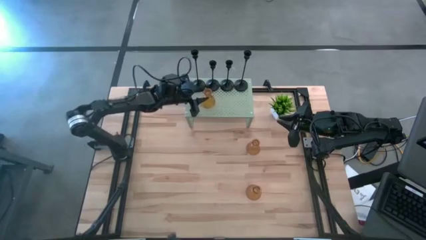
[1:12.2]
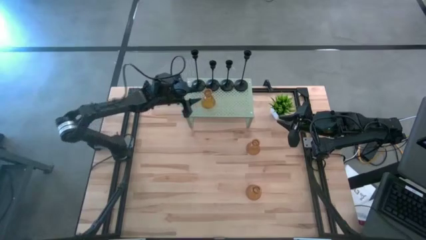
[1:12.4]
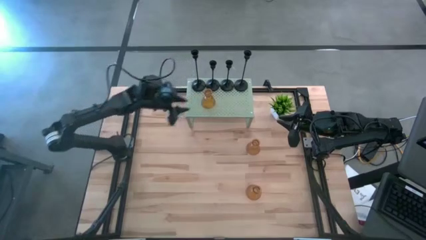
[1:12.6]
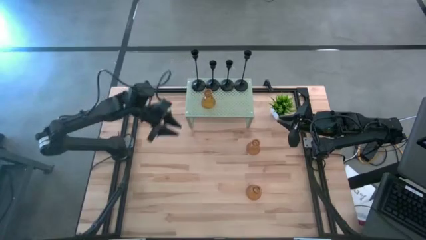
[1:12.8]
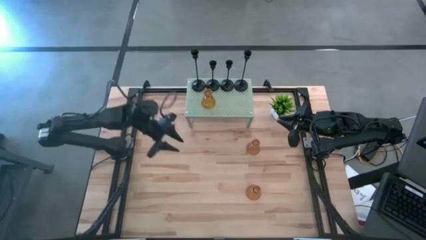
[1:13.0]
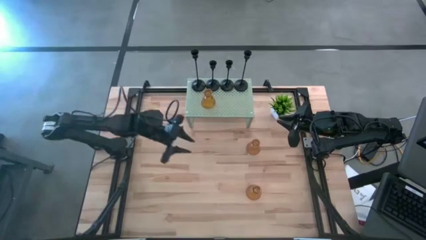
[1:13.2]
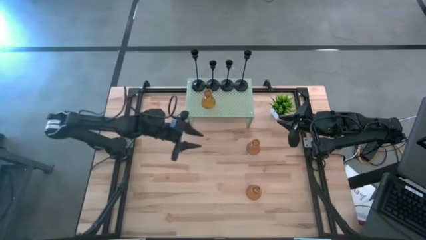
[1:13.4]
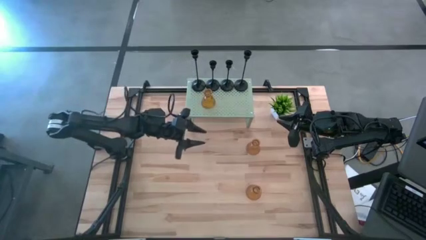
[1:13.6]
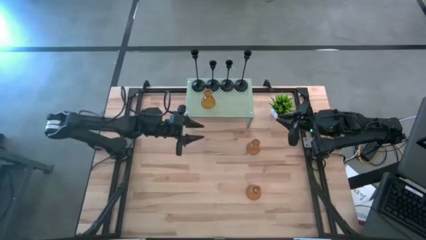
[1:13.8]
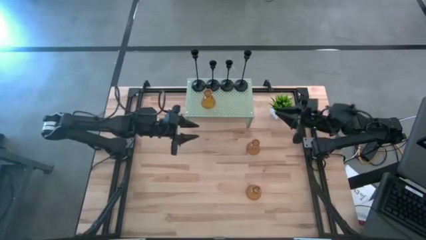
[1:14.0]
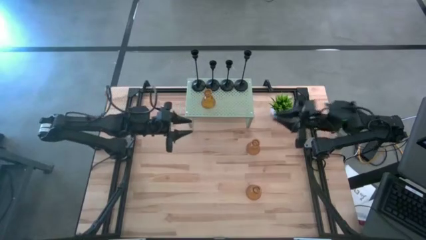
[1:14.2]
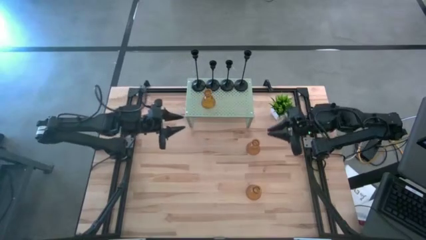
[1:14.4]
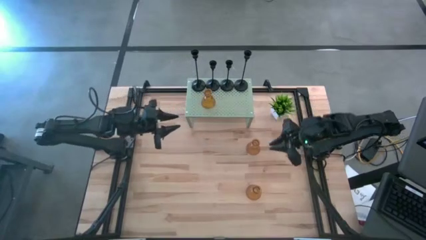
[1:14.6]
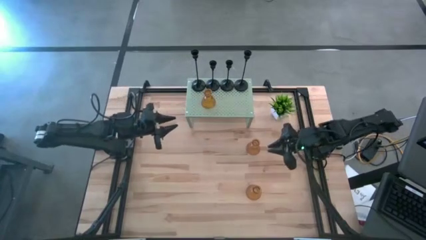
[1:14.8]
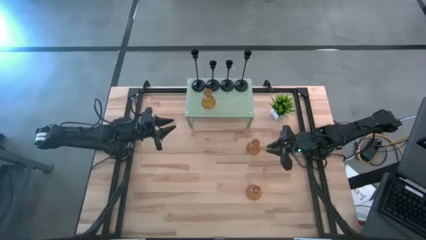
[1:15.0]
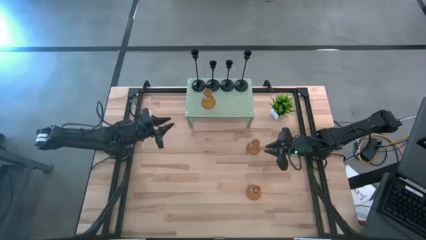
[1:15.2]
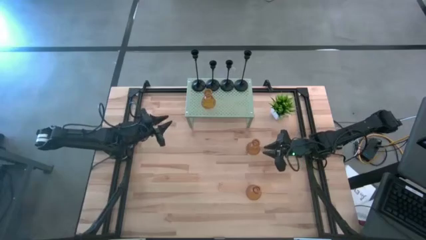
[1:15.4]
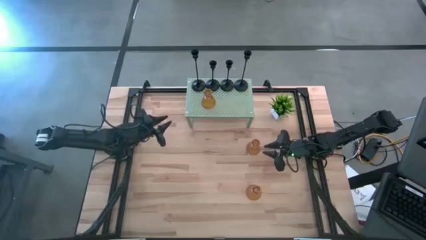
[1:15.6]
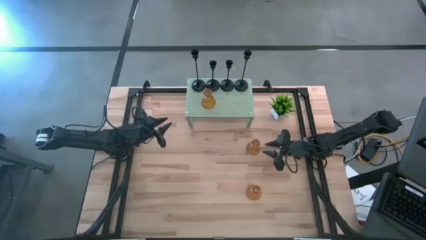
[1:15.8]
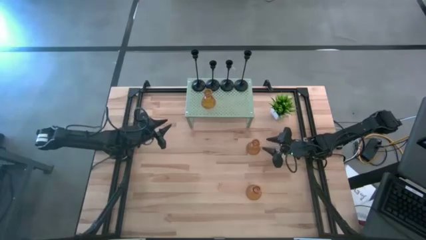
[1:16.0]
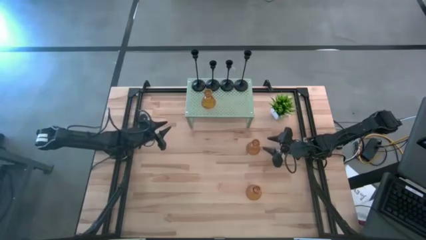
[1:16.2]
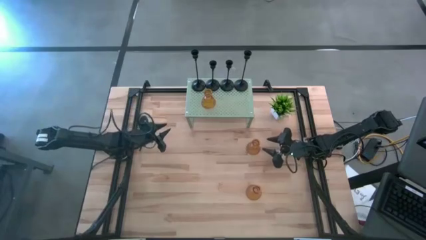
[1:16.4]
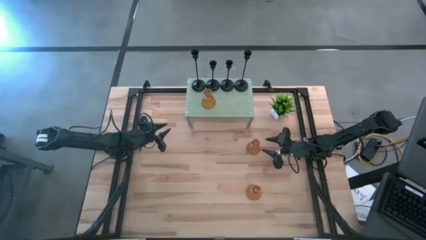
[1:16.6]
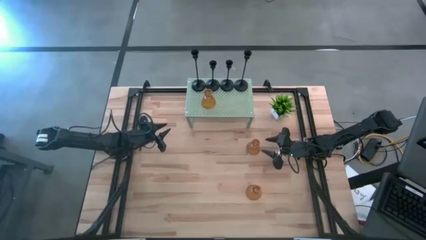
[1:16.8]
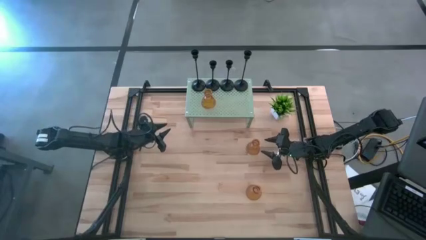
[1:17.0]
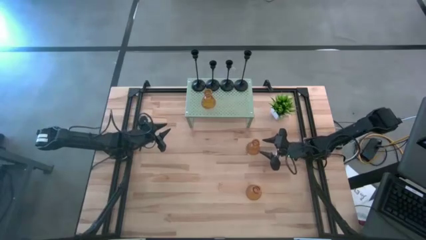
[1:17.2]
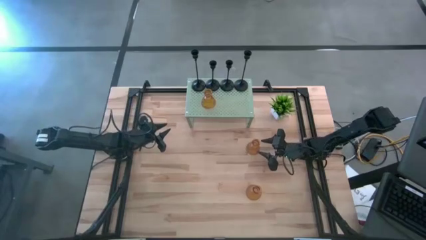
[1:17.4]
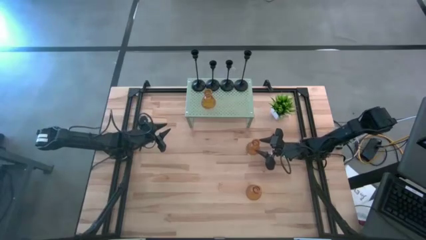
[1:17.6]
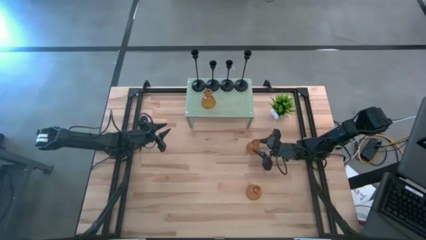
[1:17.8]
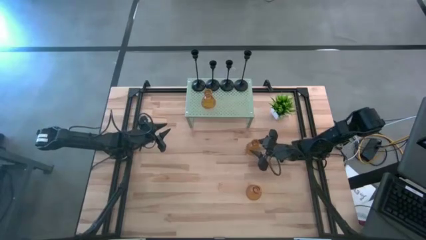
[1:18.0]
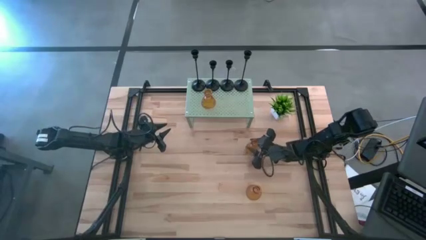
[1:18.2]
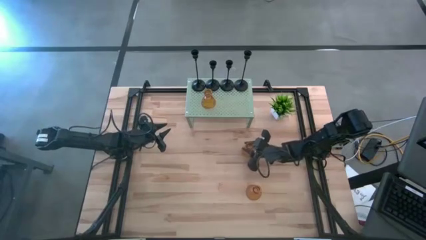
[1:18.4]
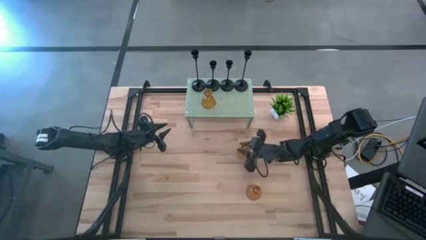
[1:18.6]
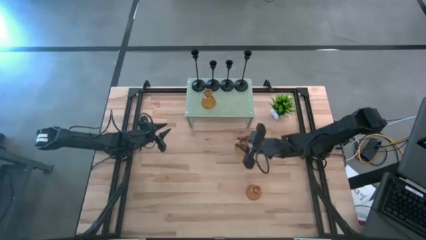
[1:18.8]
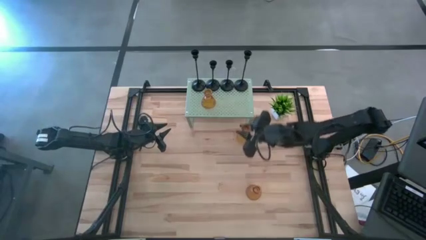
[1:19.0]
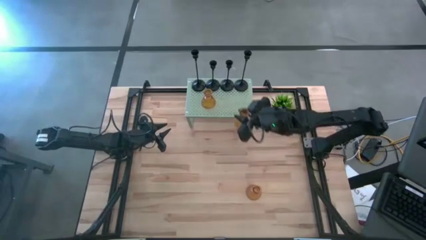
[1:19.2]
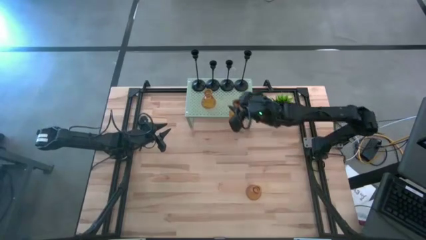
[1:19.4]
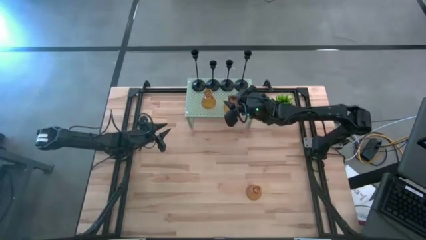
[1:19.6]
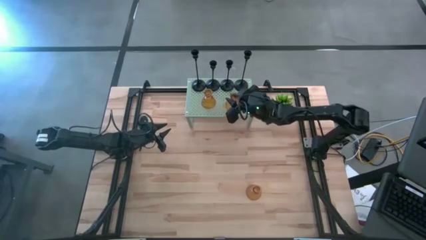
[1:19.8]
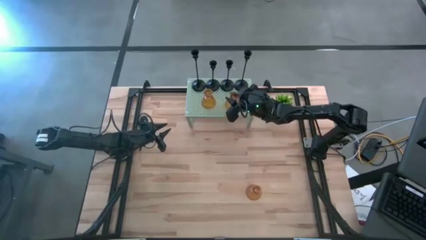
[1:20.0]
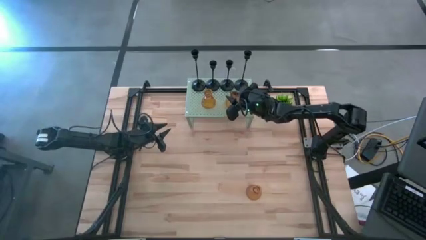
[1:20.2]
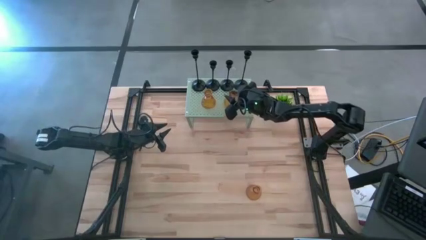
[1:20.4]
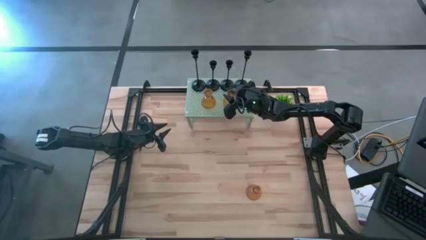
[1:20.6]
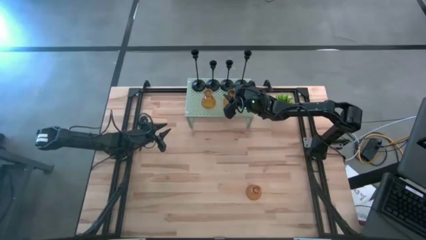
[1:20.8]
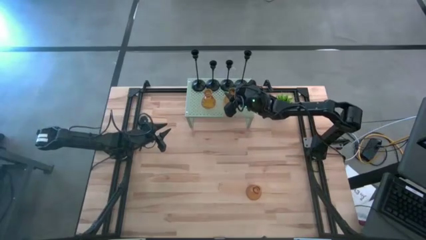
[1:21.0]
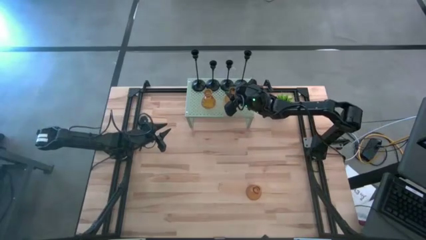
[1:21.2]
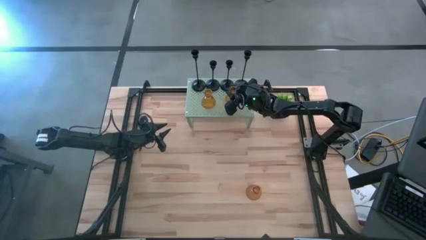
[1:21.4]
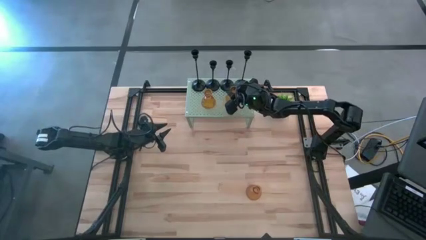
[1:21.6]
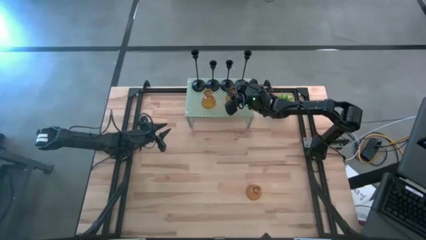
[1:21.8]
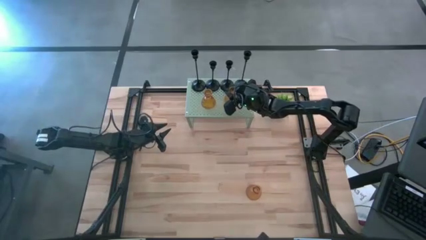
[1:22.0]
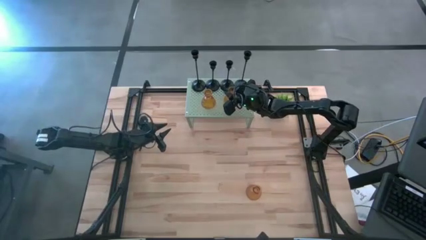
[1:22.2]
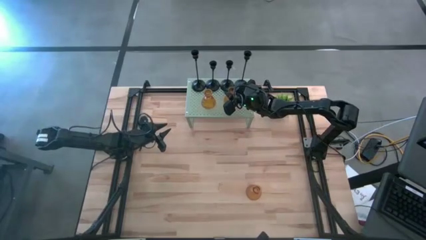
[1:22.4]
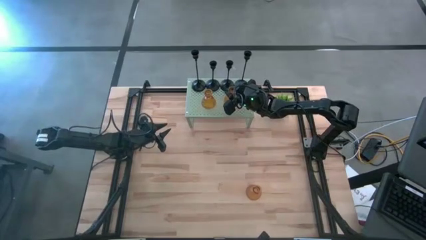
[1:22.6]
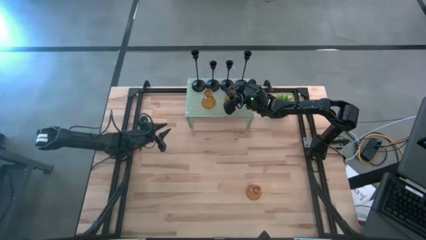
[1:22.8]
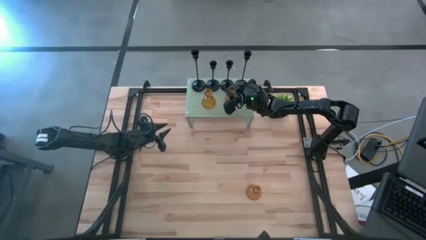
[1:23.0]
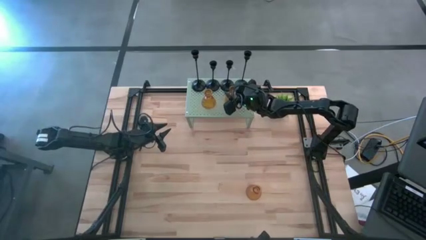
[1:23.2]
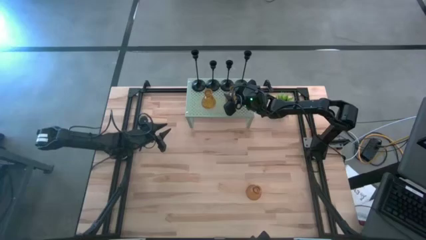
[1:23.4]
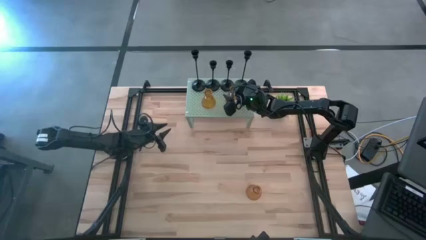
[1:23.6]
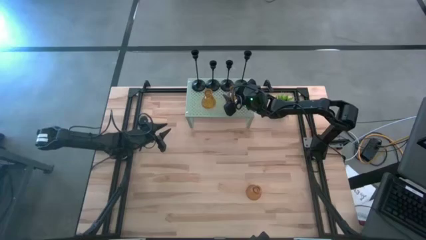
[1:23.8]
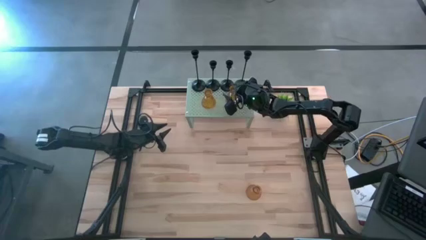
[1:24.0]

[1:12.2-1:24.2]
Task: Pick & Place candle stick holders
Put the top orange candle holder on the shelf aligned with the other orange candle holder

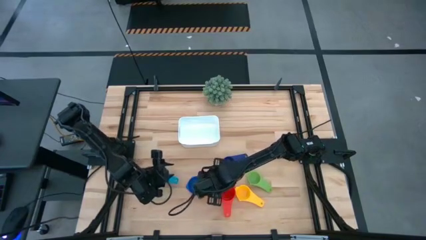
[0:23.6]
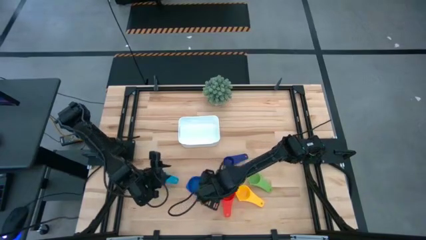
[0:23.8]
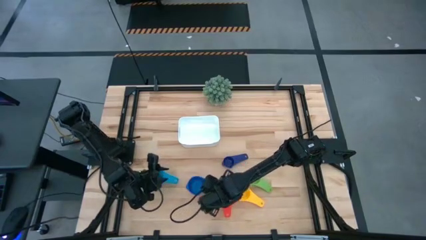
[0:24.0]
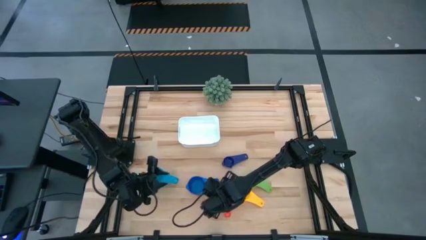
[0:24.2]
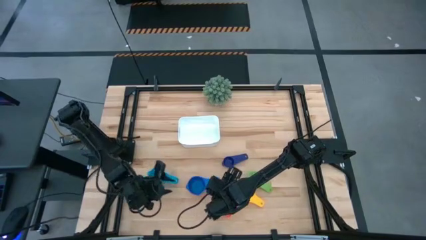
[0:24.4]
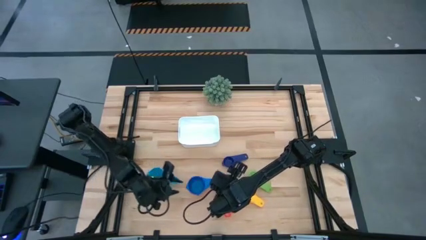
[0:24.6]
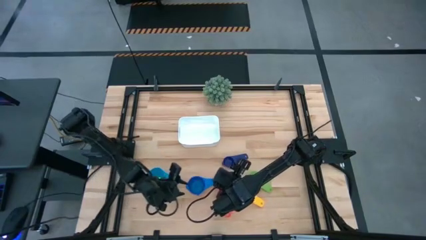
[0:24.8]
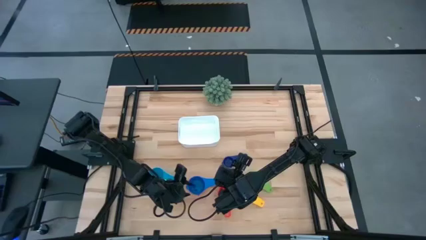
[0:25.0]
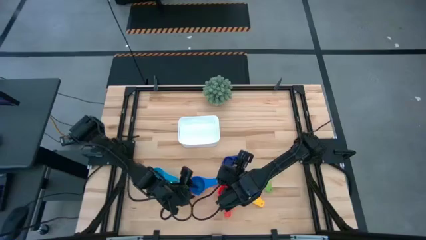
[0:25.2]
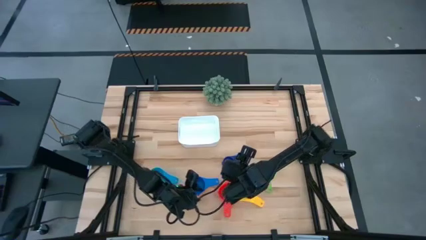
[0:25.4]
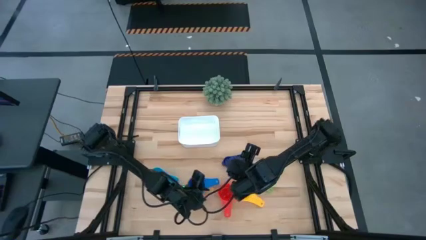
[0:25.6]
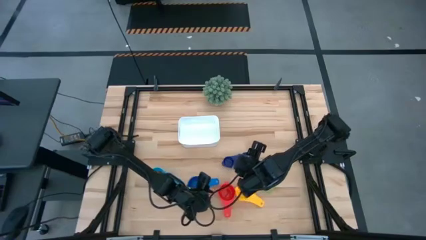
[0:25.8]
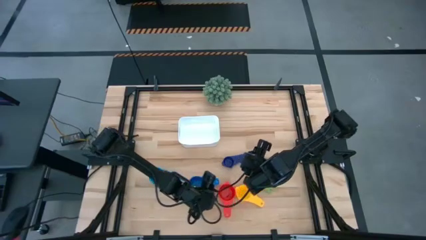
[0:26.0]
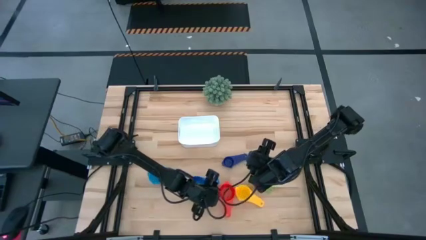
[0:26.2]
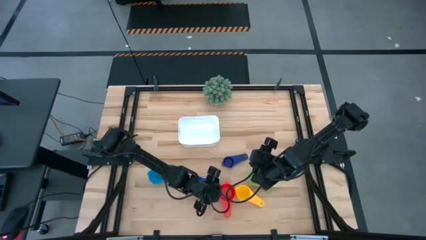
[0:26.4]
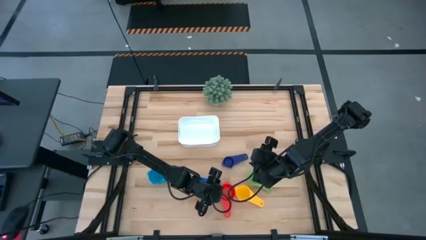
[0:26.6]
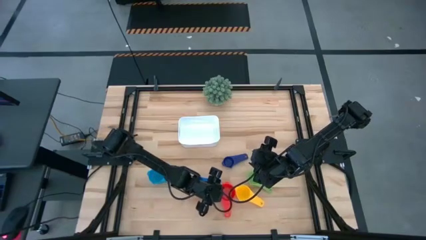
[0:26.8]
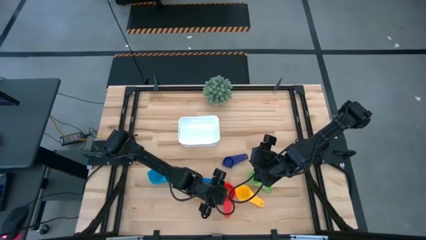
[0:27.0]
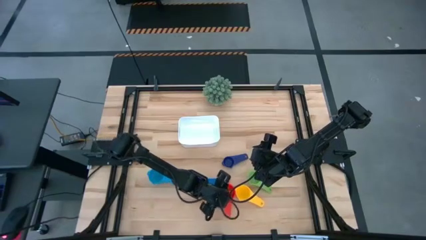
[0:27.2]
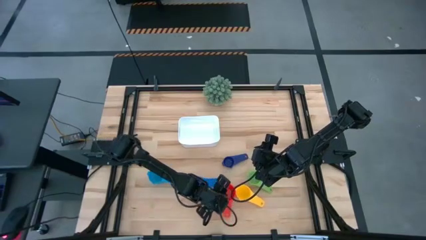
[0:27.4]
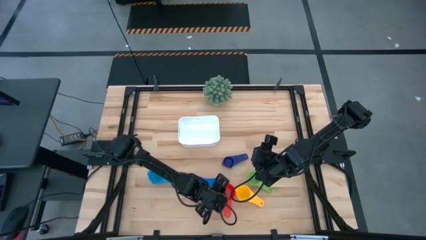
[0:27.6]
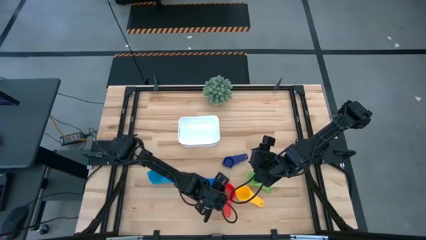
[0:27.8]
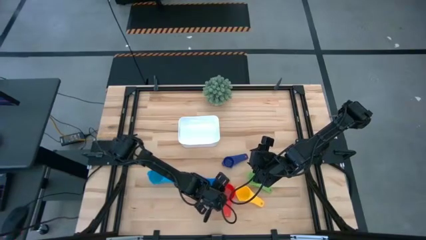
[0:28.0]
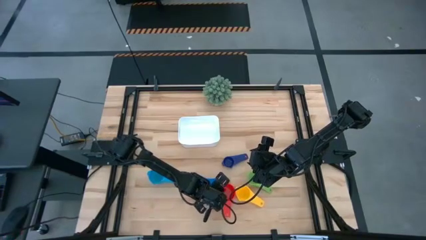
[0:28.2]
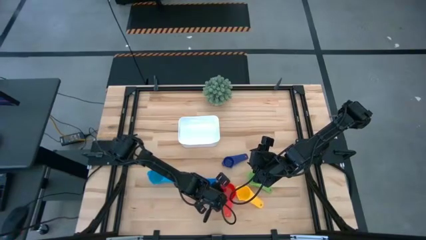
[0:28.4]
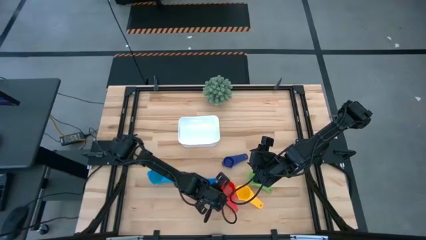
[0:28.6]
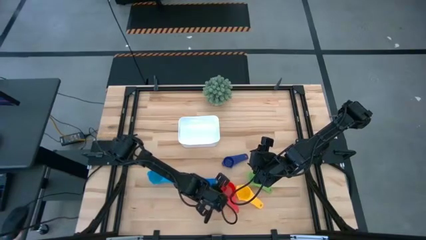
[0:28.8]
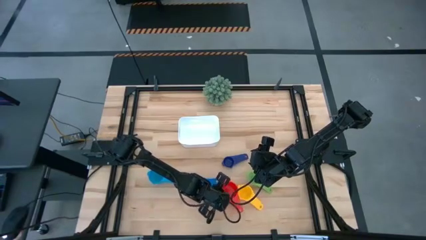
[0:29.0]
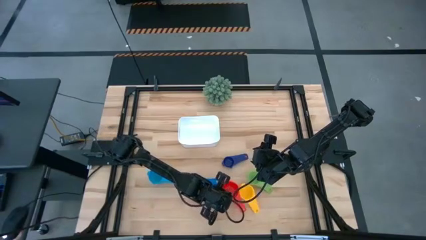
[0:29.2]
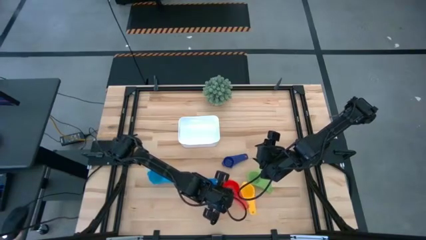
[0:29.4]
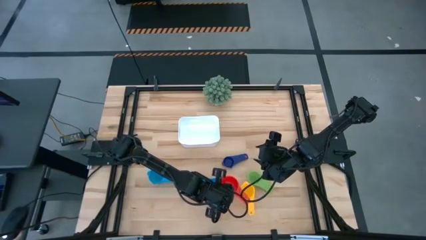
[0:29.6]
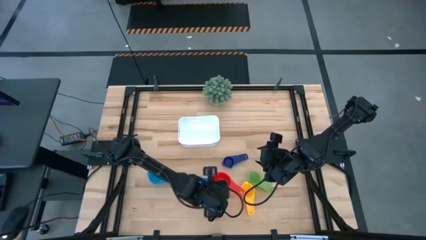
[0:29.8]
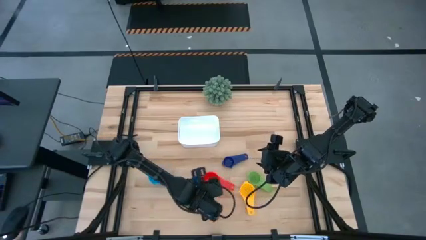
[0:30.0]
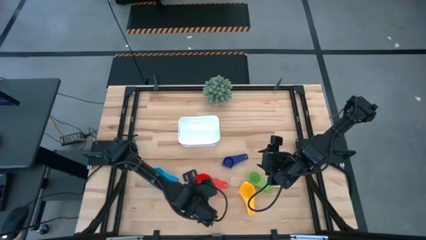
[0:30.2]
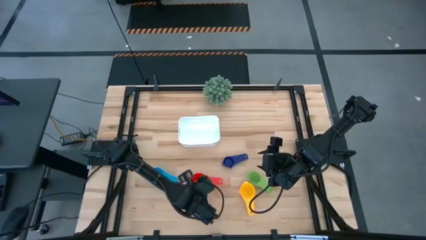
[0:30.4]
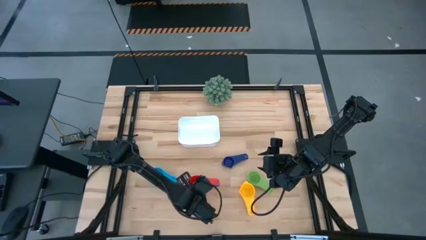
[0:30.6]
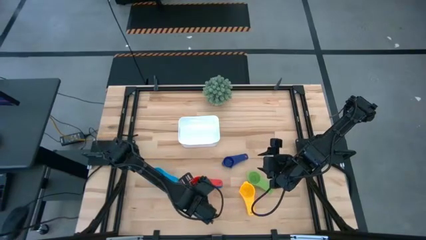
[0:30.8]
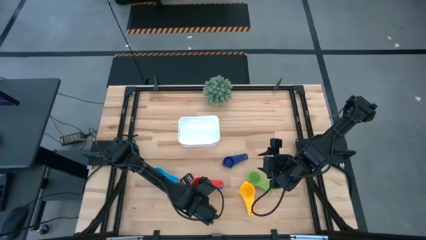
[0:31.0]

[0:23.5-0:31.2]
Task: Nest measuring cups in basket
Stack the red measuring cup on the top of the large blue measuring cup
